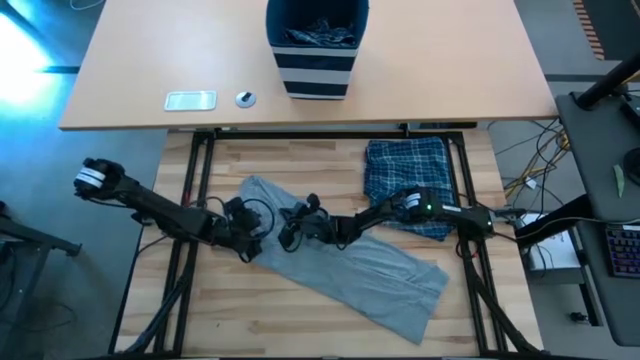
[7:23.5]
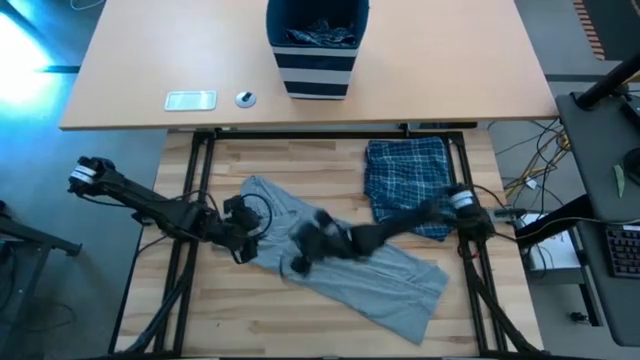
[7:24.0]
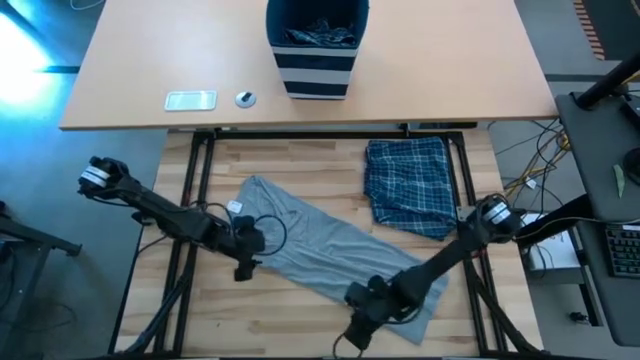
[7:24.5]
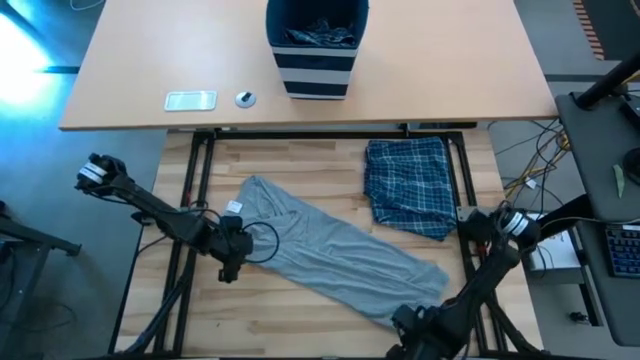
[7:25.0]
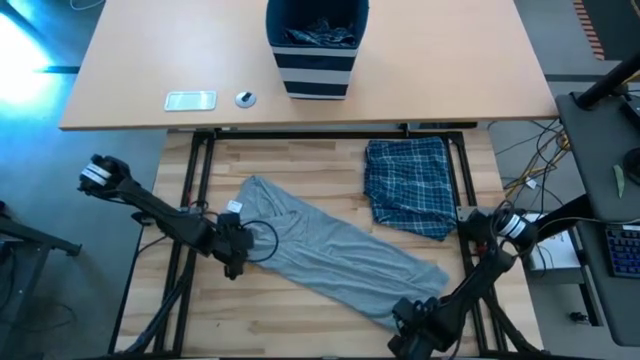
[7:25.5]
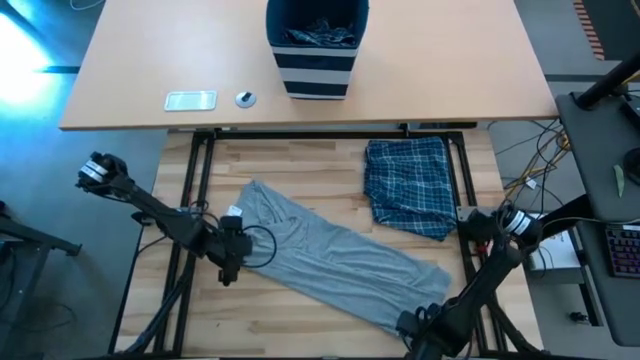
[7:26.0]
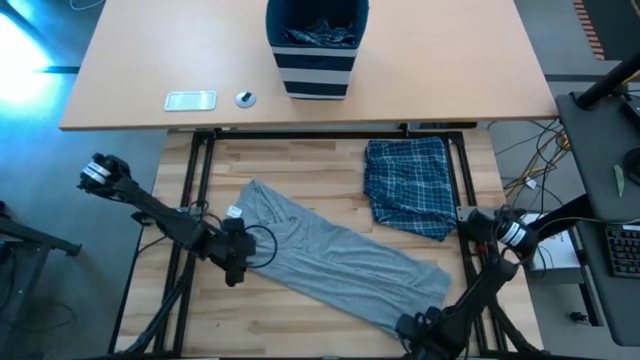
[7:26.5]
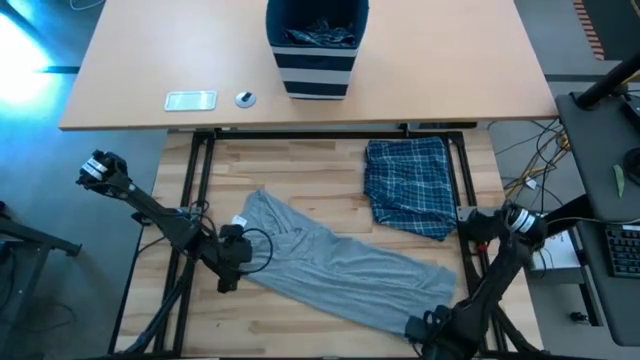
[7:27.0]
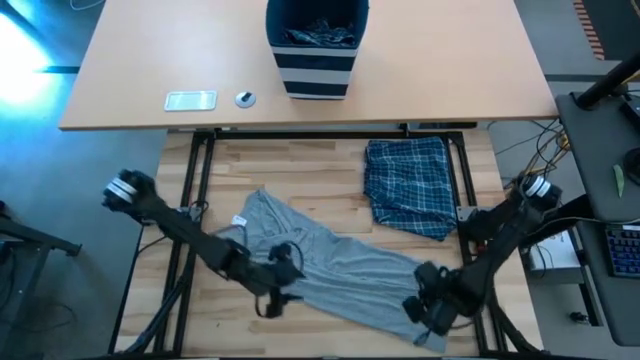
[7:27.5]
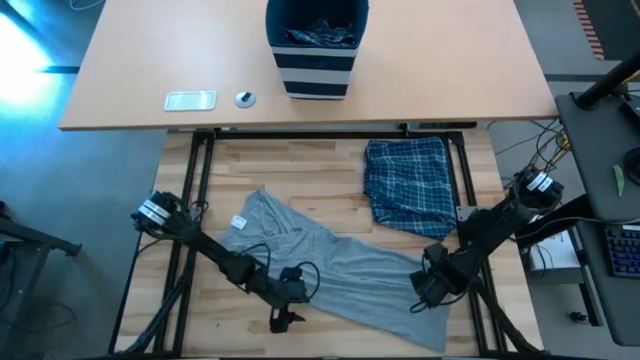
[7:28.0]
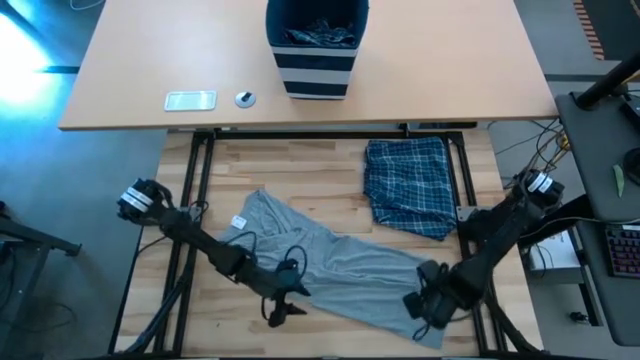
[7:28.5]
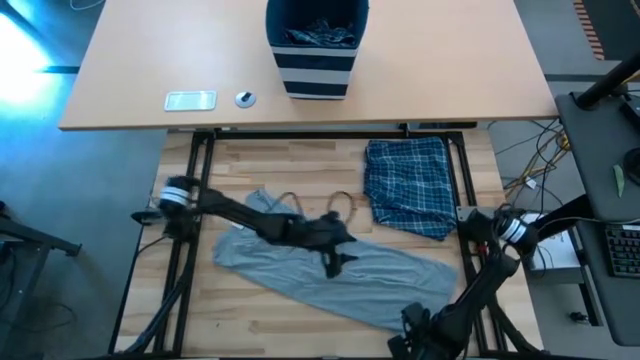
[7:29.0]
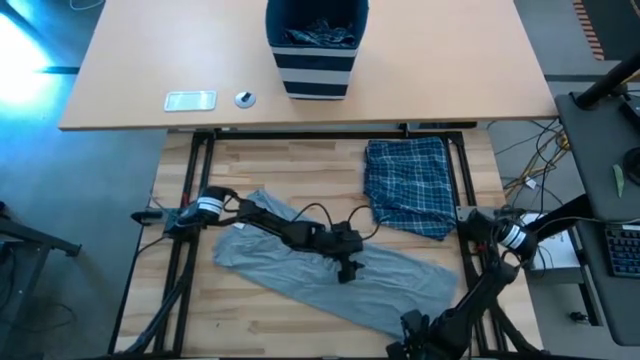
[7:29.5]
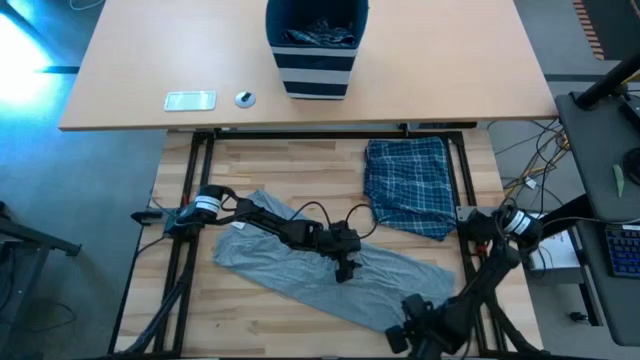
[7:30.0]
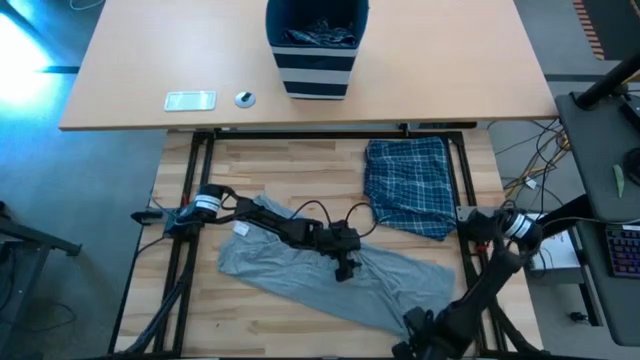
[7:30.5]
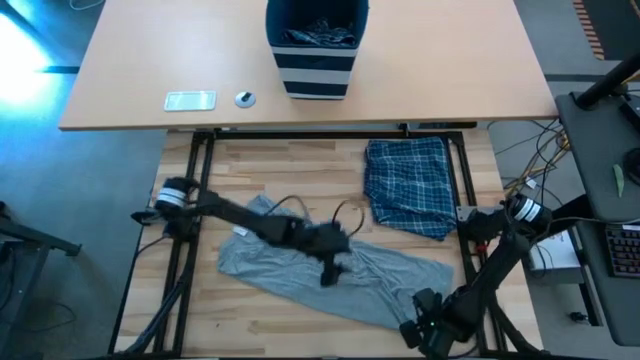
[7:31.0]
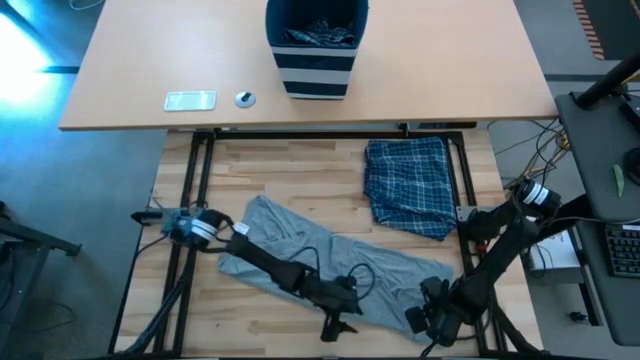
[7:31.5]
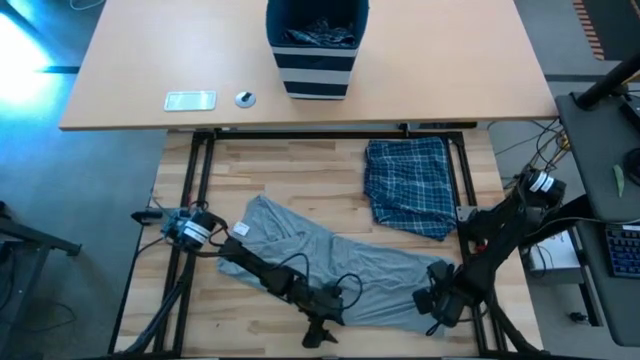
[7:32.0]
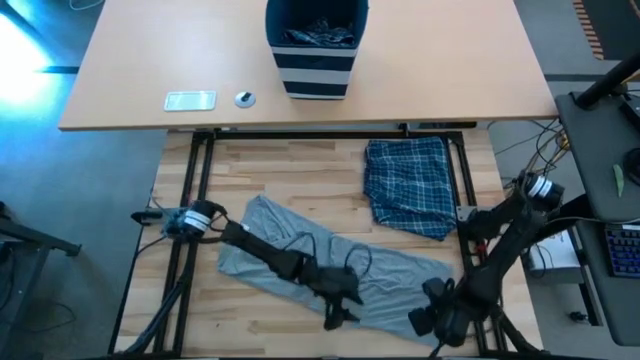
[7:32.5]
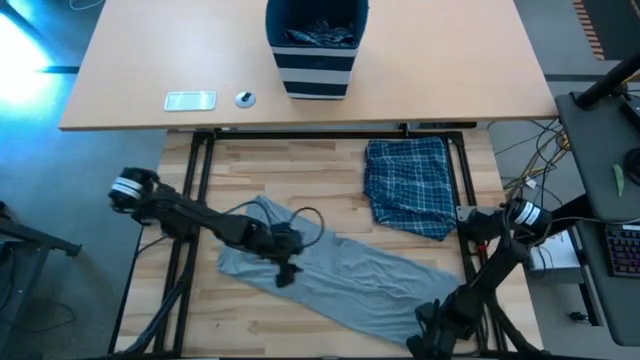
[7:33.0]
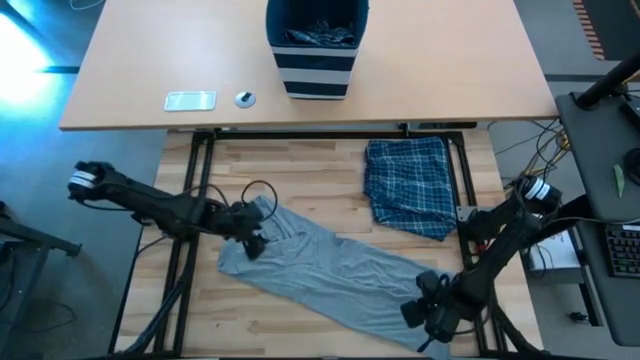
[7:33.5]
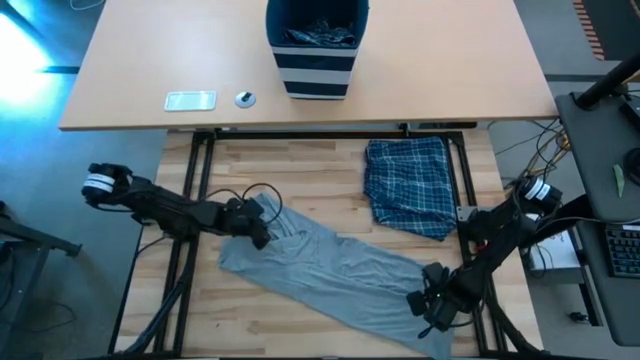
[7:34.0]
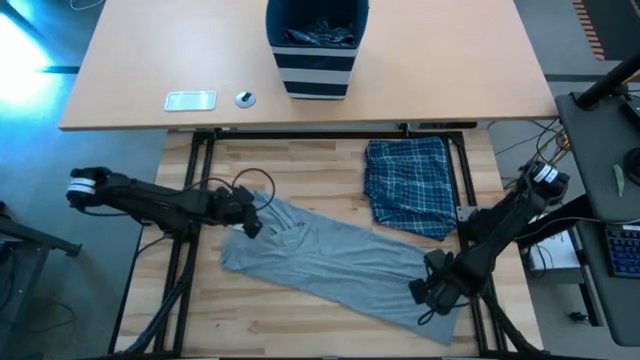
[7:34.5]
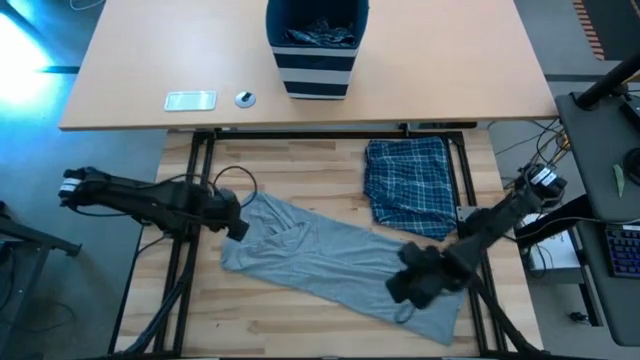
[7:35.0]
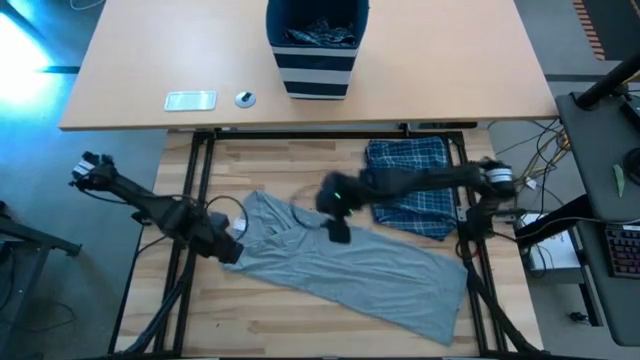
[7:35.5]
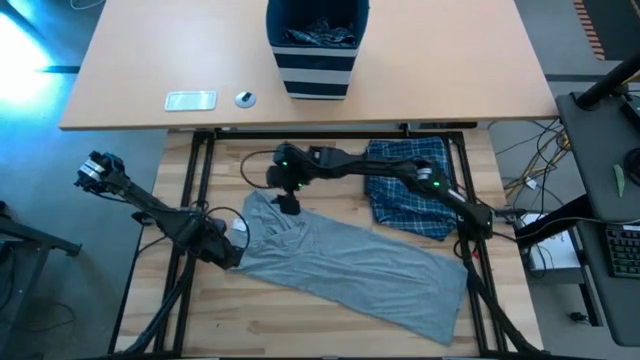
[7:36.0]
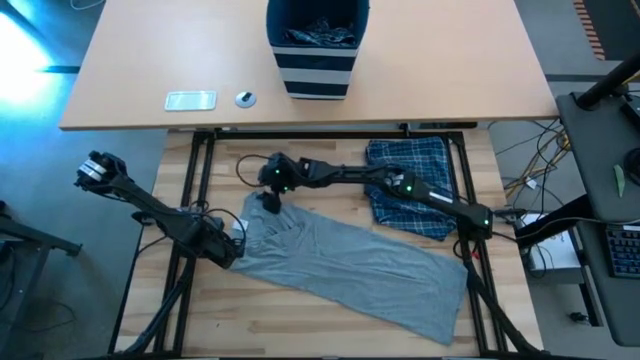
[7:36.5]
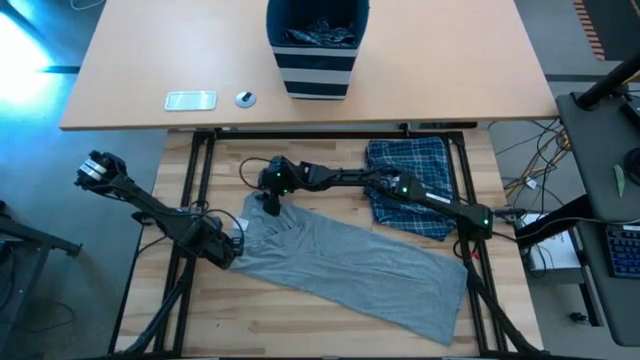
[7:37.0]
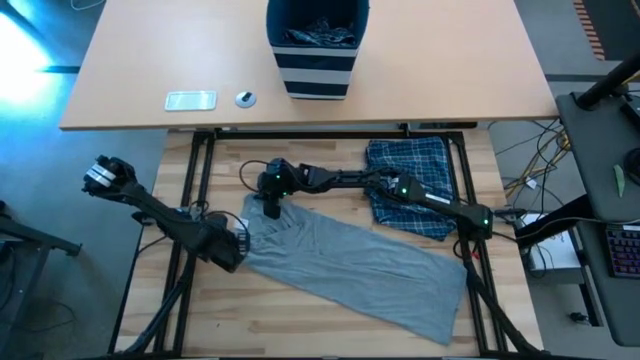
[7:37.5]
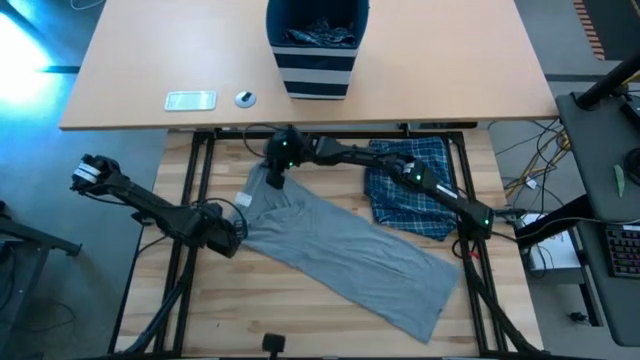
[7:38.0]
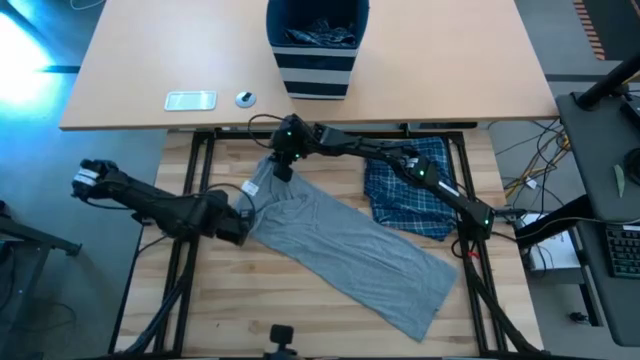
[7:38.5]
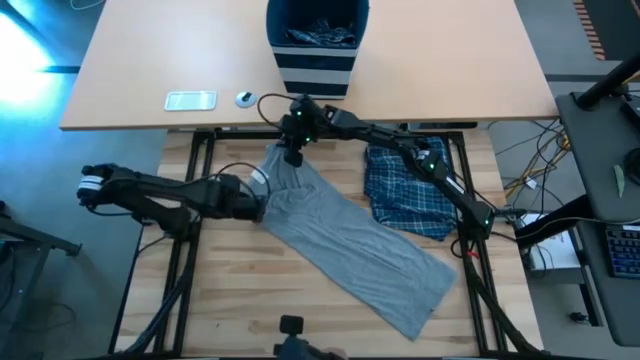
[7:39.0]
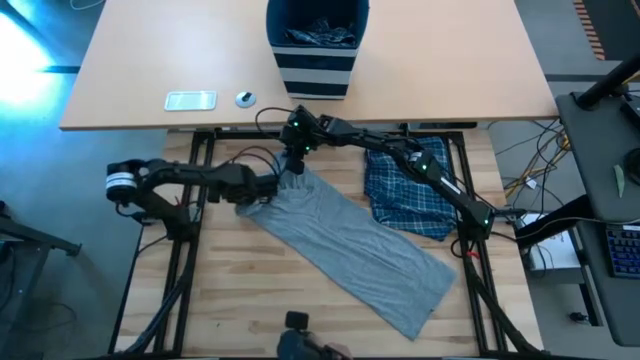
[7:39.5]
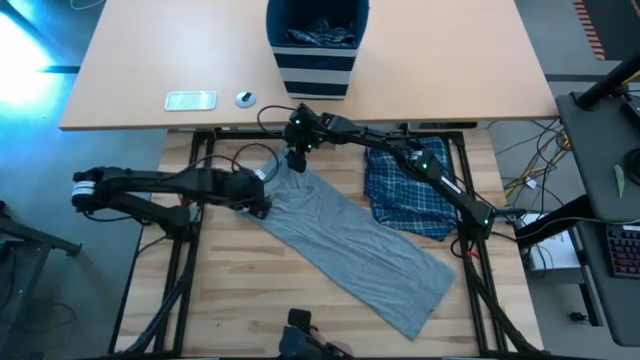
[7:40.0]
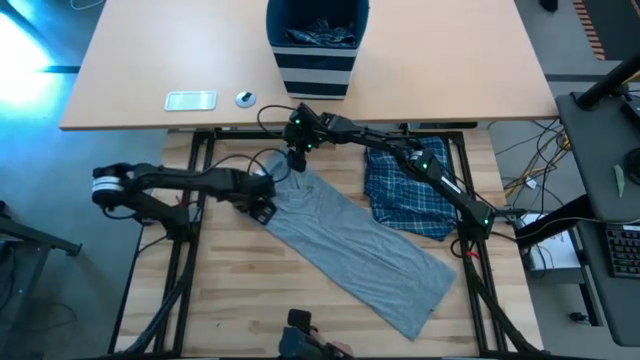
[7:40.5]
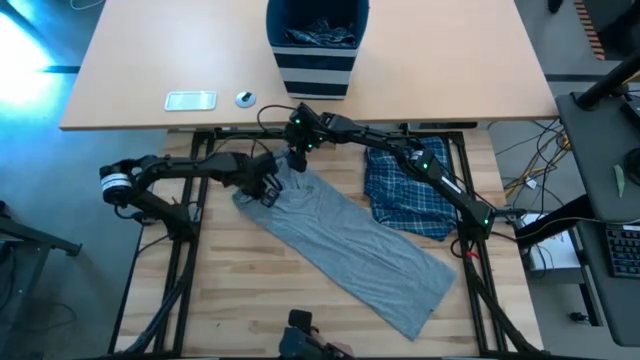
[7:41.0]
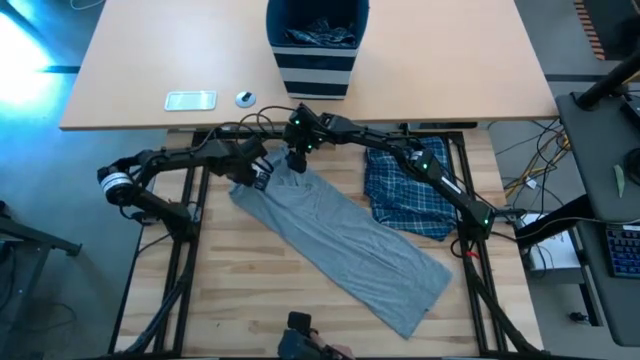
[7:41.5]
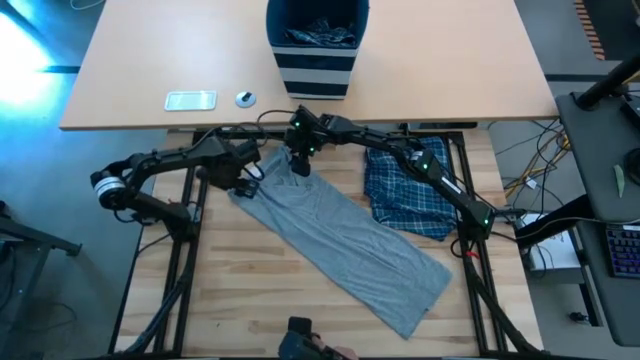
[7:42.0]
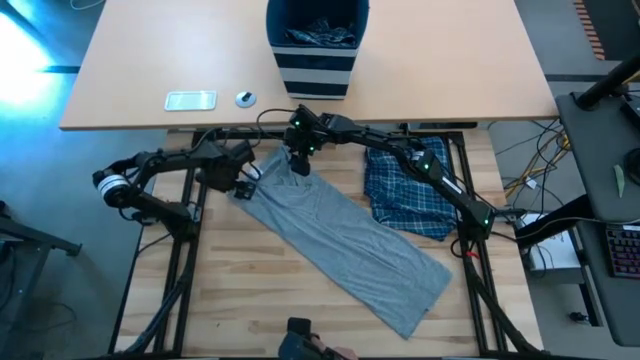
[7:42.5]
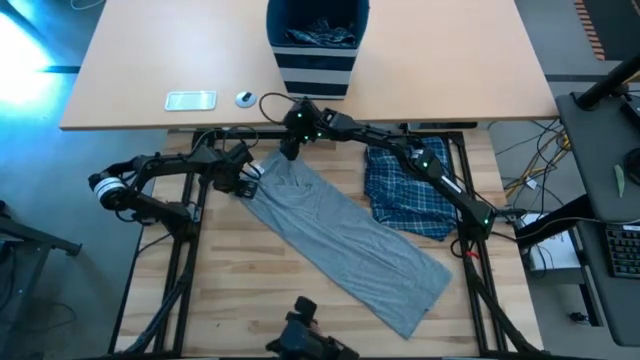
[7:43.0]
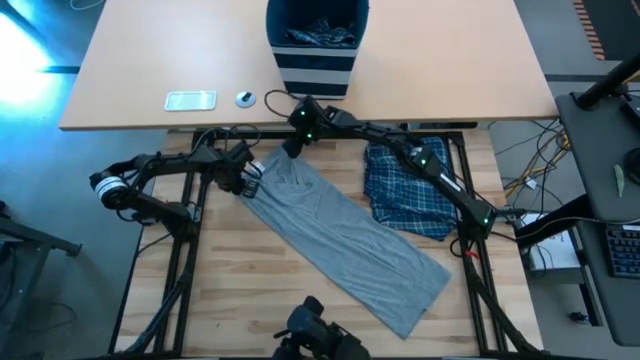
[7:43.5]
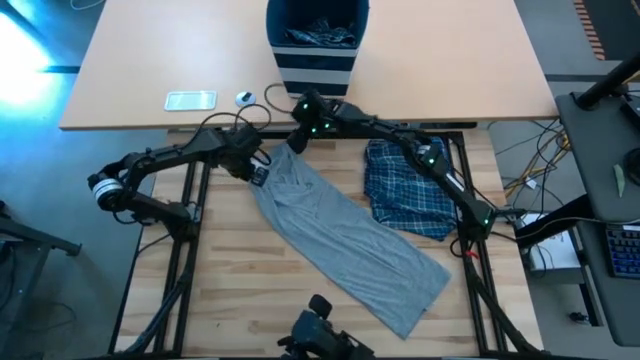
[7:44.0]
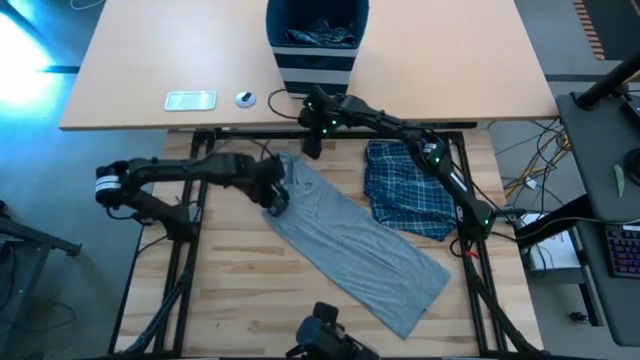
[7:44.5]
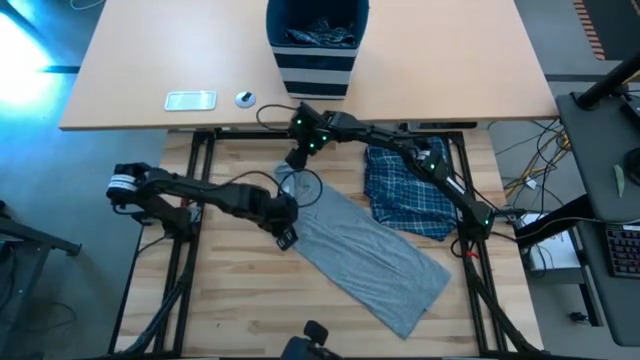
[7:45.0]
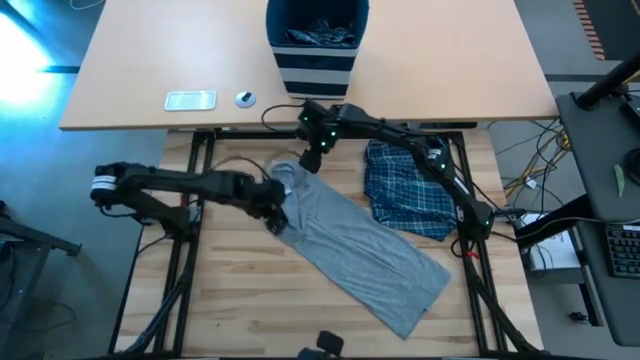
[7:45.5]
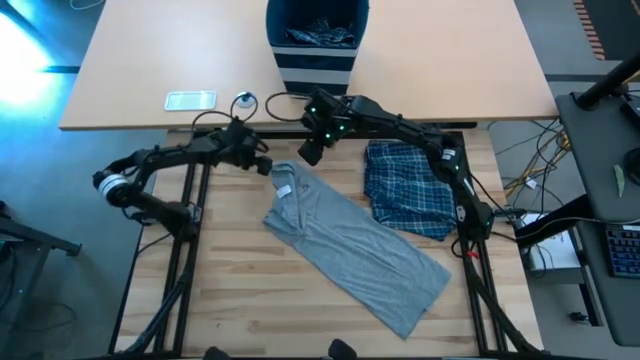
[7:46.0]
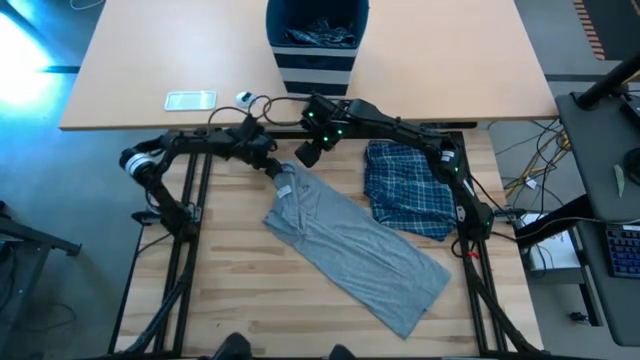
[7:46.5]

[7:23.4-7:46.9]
Task: Fold Laundry from Bin
Fold the gray shirt
